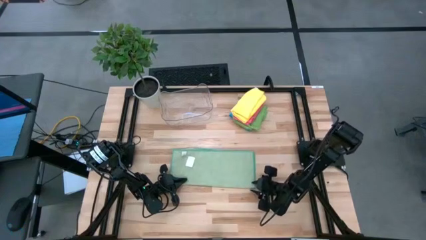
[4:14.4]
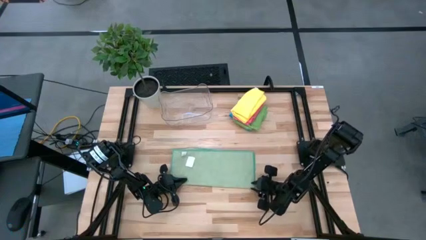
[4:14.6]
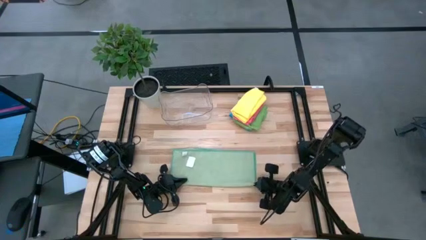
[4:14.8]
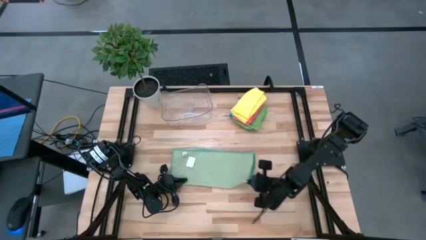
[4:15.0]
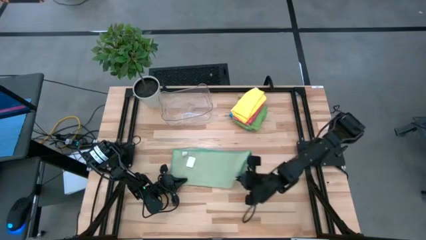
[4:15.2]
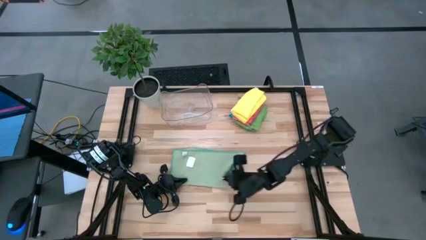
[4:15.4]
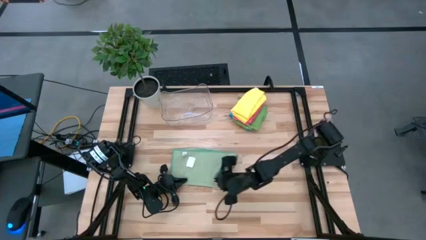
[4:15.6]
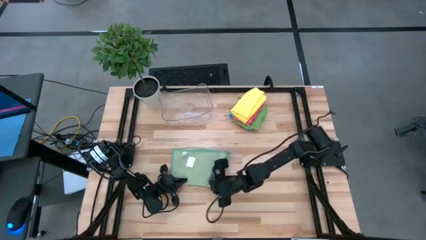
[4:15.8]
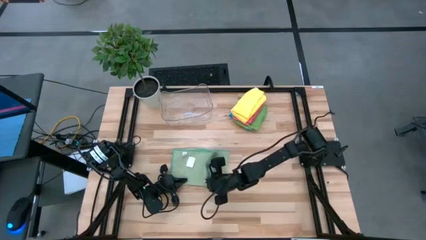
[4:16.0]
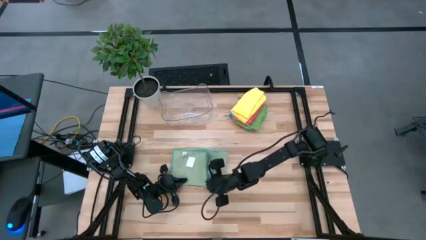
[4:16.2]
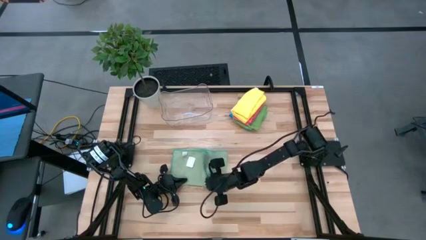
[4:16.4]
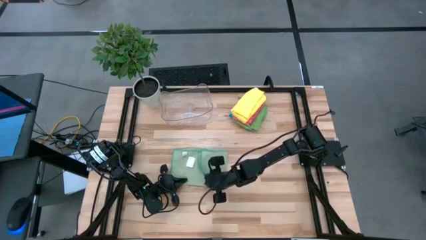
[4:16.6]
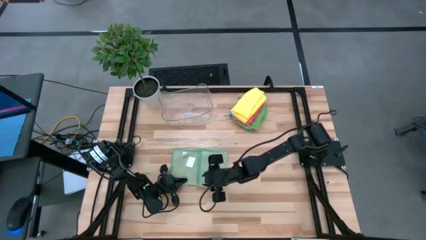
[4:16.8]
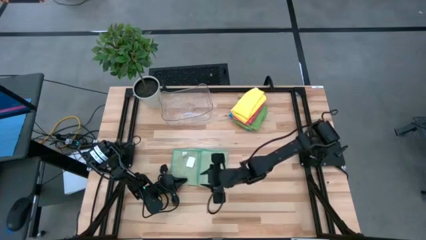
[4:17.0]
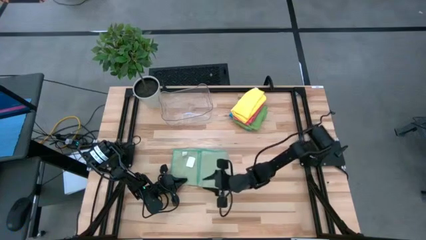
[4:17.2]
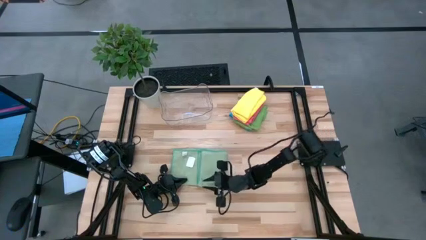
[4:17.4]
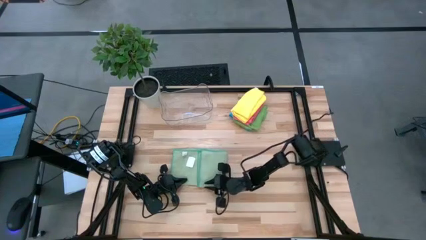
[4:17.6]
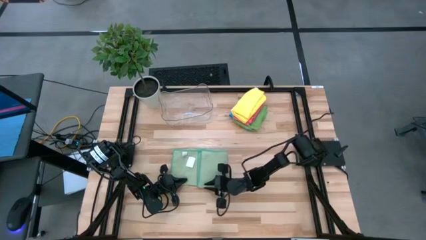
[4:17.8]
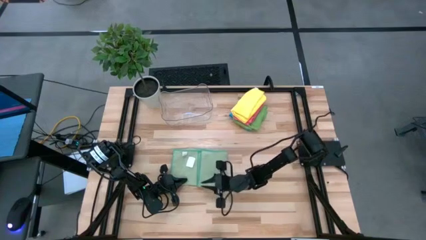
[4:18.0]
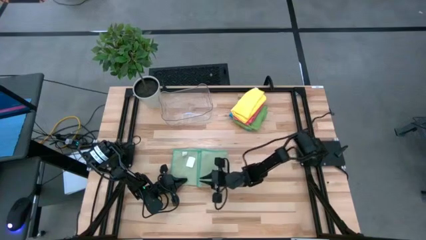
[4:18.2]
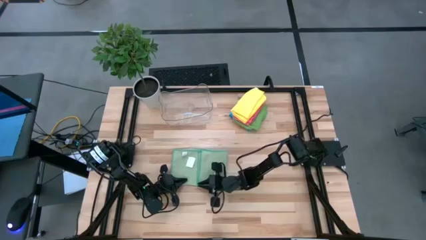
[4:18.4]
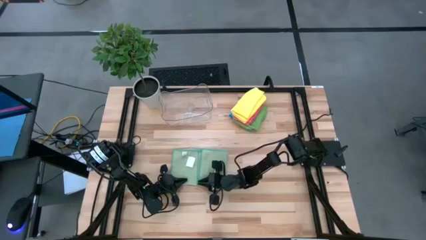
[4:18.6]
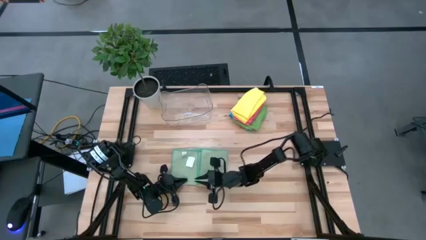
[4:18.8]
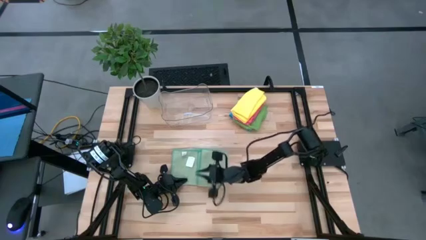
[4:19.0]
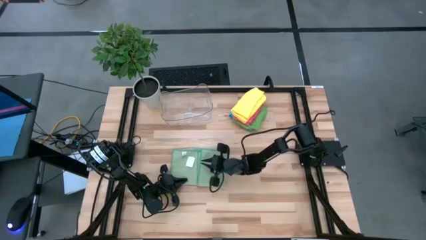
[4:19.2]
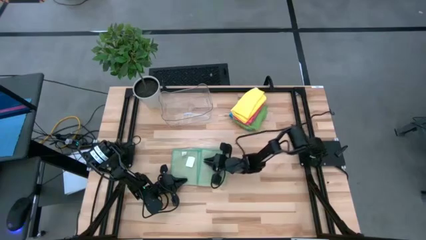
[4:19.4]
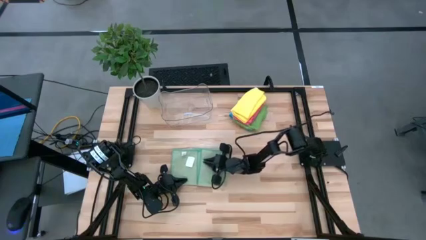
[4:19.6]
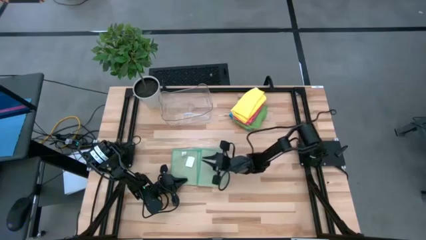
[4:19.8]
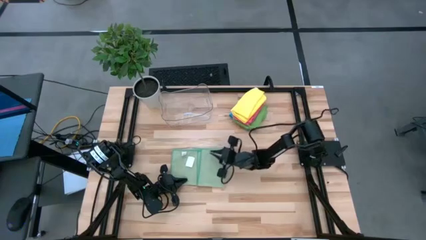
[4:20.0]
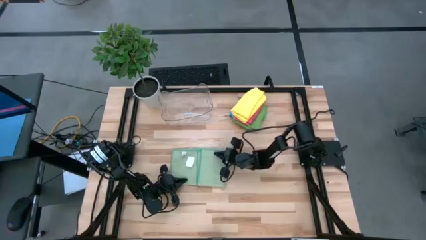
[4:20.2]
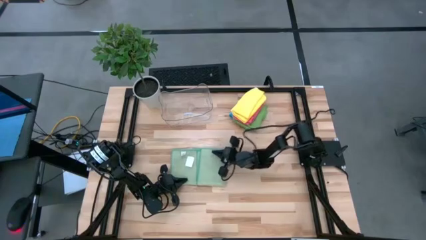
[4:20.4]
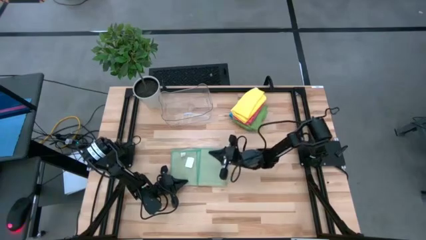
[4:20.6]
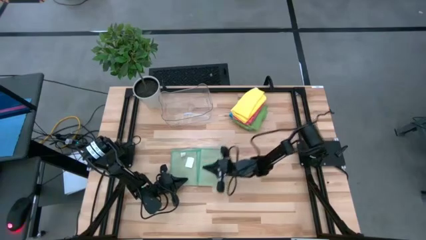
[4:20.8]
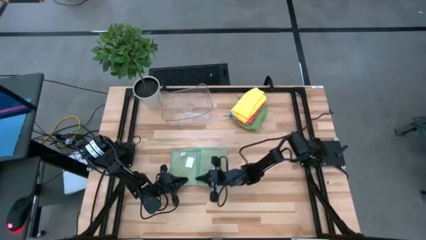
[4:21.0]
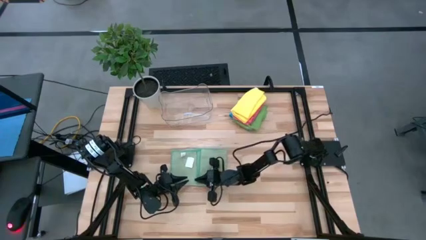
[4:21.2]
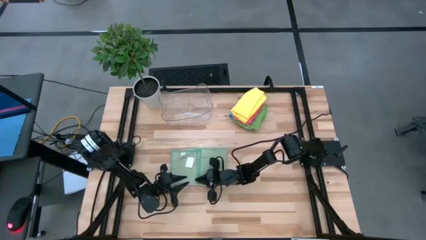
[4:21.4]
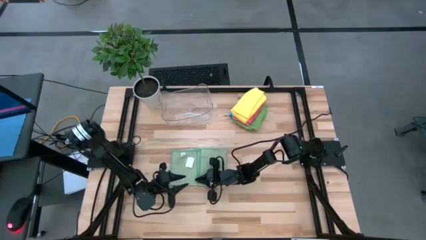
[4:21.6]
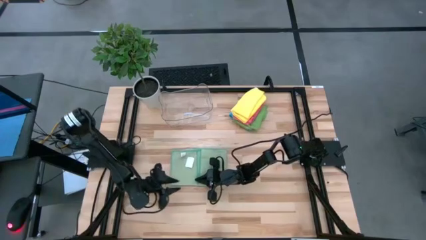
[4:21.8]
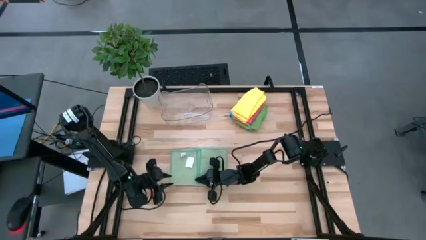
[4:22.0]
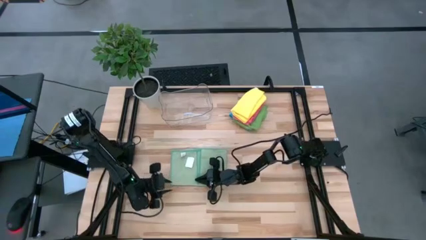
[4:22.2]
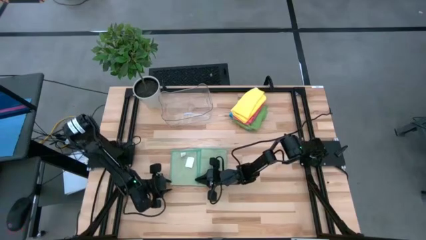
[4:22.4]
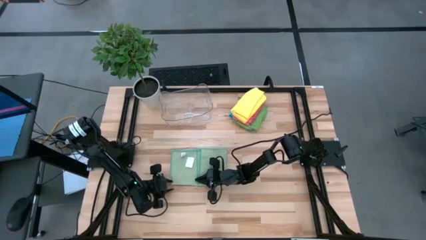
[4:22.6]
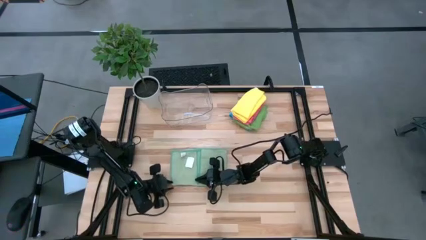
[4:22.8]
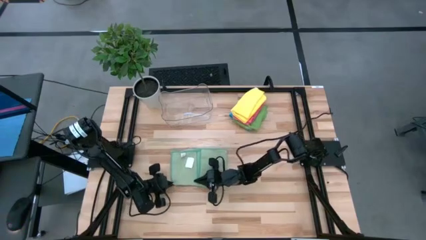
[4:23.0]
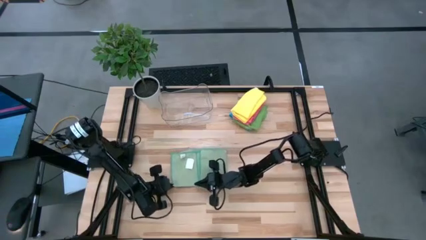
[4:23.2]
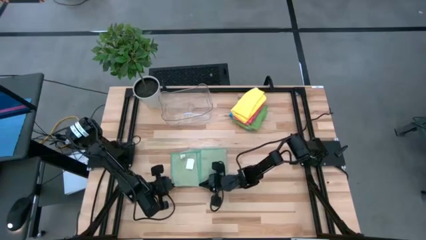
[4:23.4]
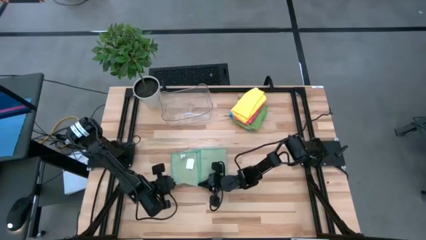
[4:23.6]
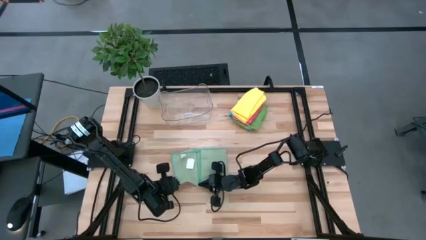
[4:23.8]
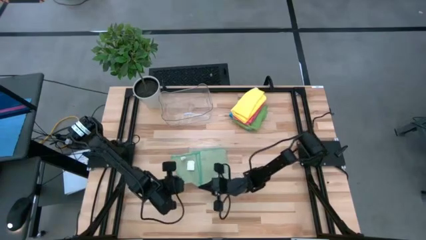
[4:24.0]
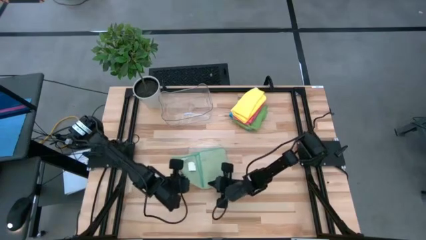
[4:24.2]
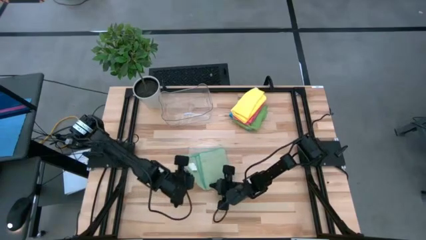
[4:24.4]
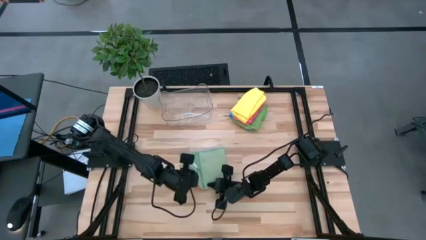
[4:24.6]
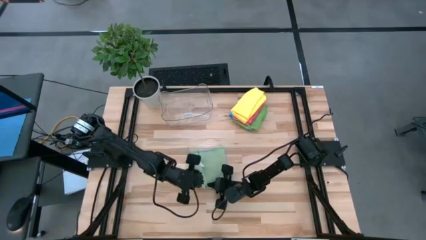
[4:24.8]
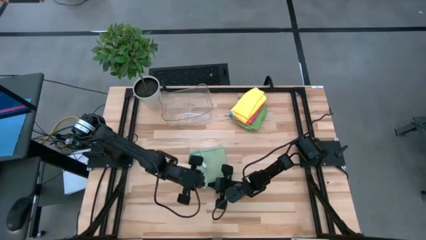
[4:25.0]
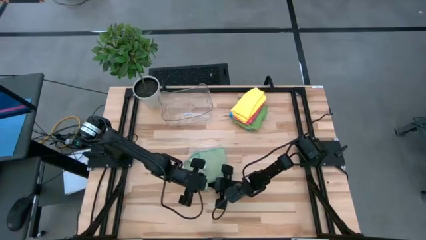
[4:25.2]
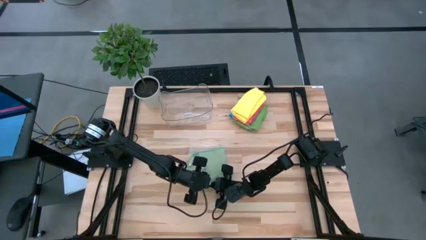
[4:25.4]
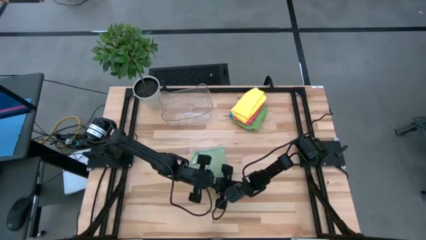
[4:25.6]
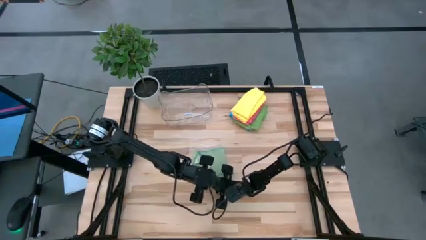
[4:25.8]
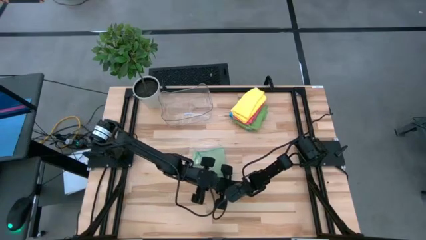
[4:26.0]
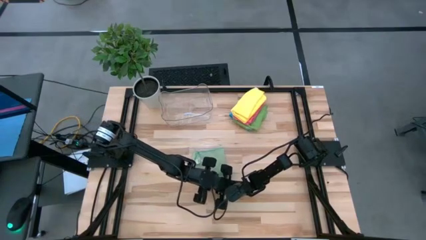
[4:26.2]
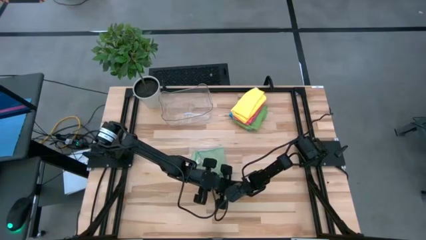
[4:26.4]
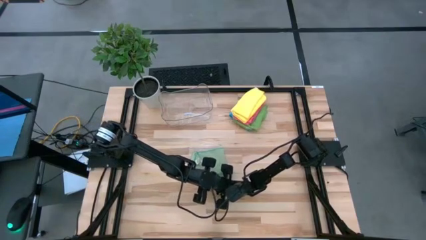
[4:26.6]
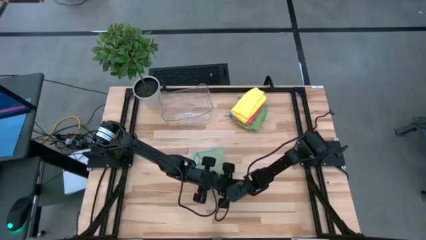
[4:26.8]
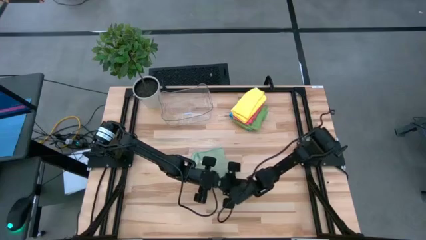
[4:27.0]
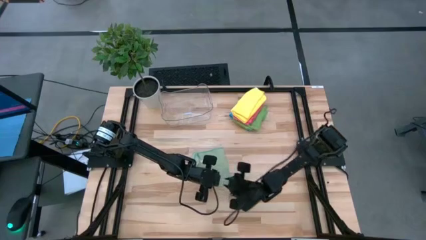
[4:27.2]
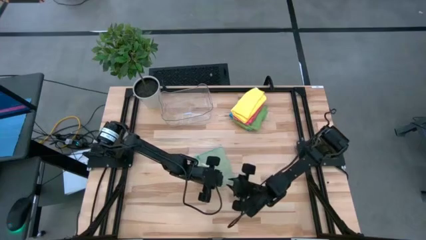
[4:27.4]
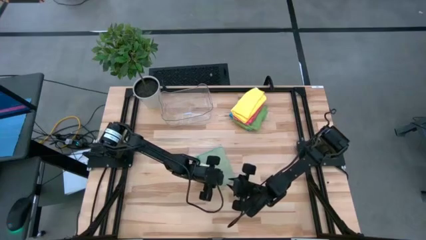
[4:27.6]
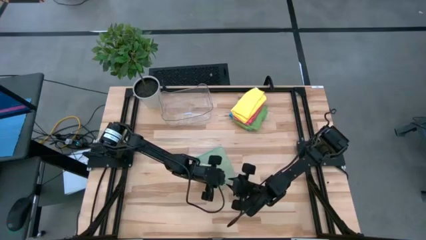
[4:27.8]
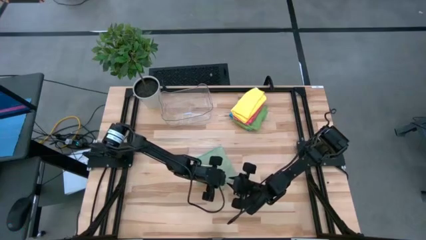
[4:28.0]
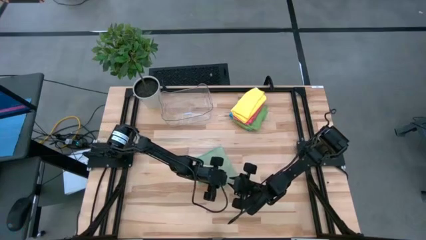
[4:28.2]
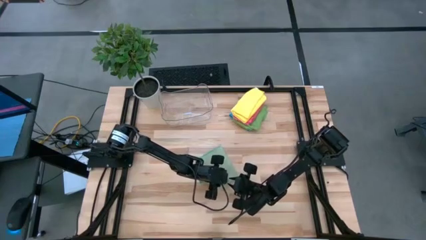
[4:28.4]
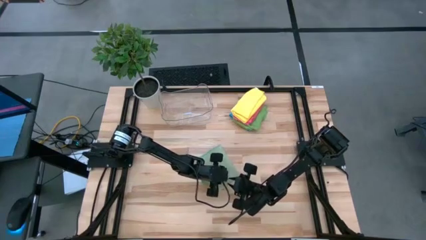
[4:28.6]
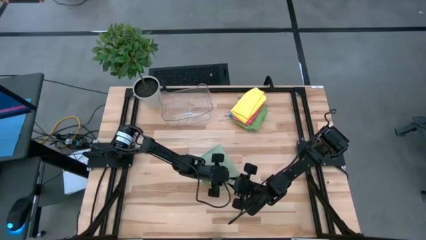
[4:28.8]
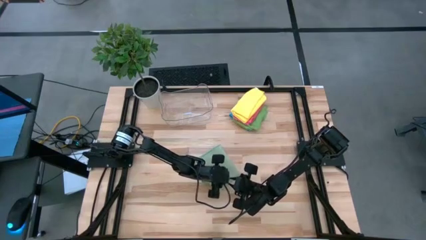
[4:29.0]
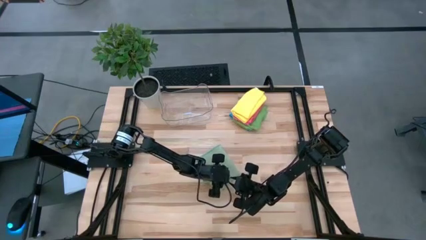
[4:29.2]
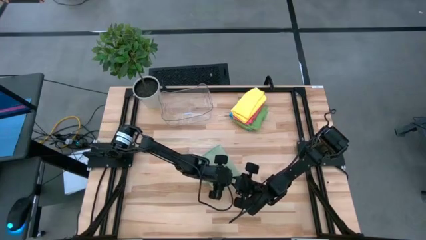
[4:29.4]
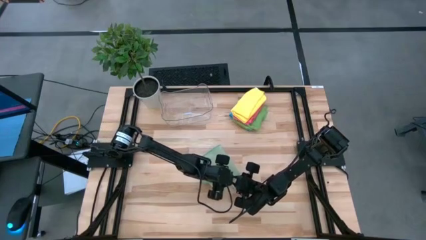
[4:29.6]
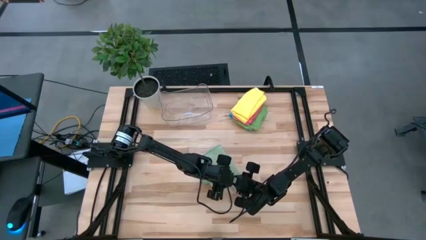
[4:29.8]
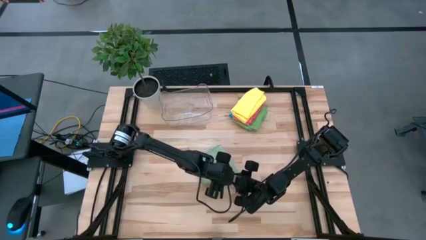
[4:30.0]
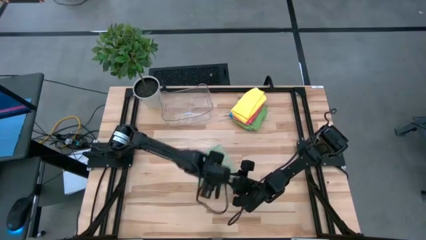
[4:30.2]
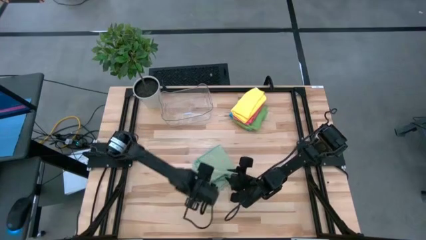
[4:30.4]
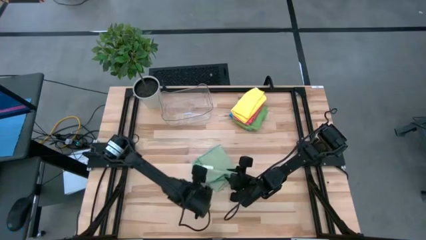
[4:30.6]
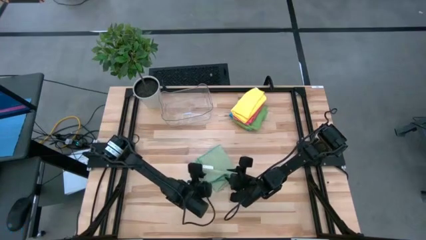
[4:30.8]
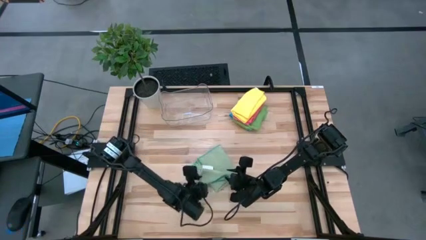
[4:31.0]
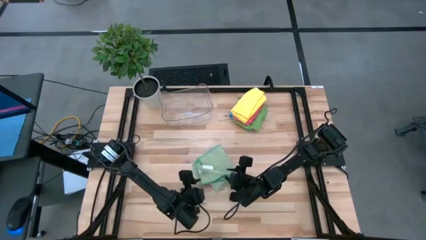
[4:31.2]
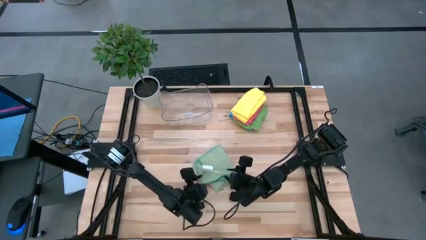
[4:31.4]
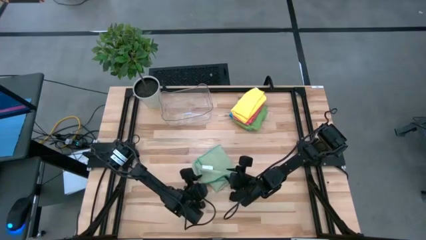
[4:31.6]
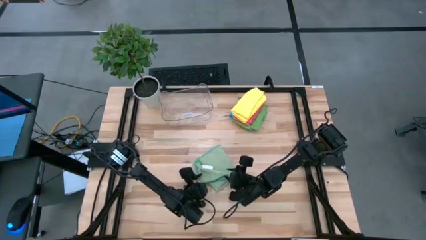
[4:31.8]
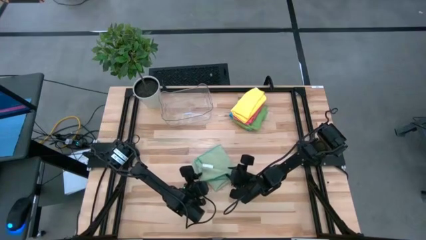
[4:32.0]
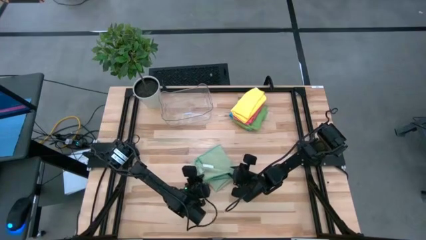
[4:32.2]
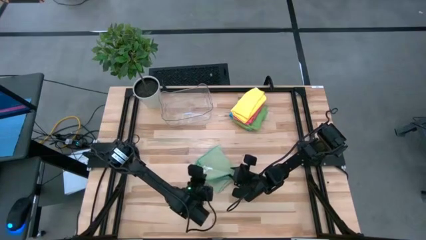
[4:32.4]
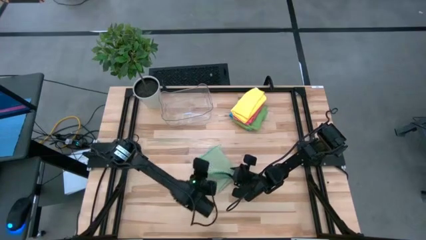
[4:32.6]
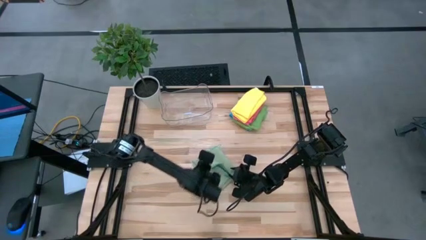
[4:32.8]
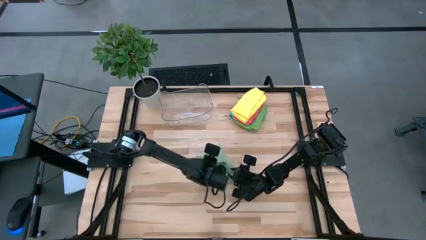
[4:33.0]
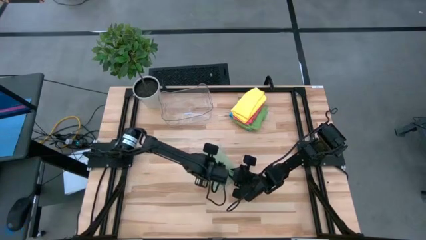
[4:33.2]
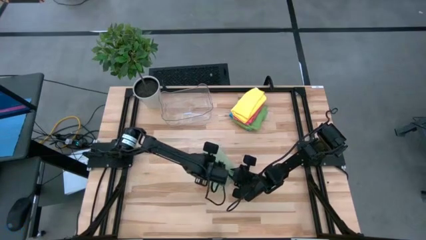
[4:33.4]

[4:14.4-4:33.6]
Task: Fold microfiber towels
Fold the light green microfiber cloth
